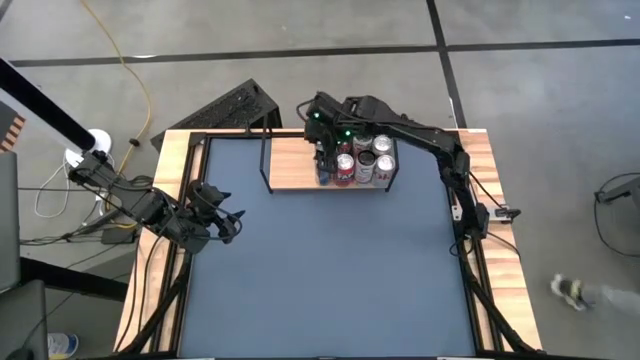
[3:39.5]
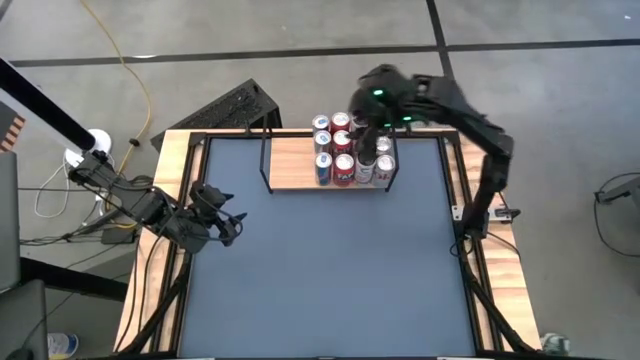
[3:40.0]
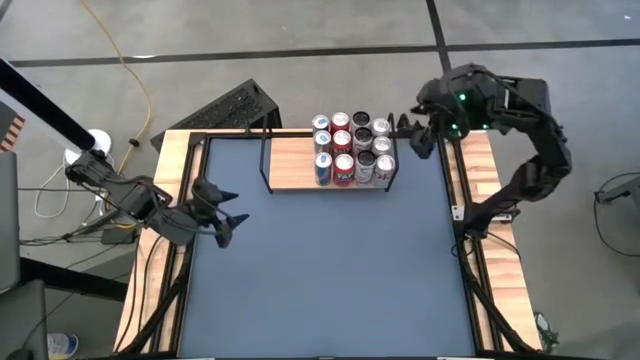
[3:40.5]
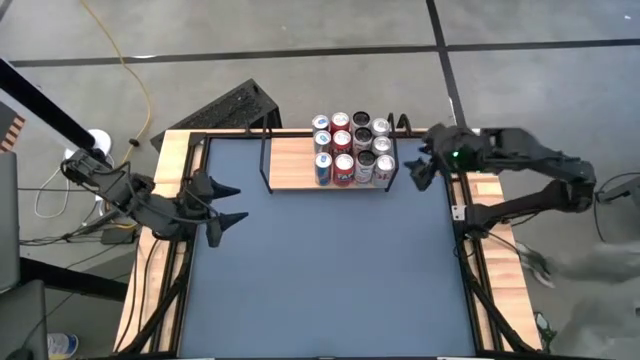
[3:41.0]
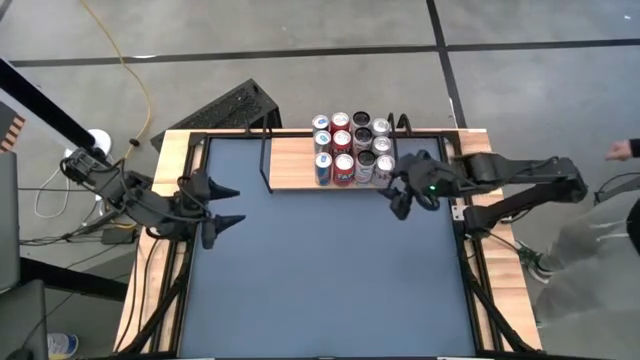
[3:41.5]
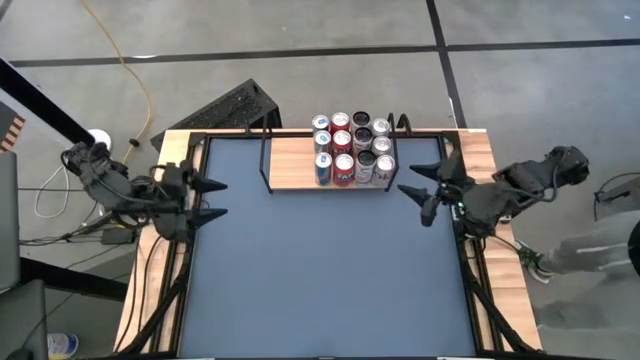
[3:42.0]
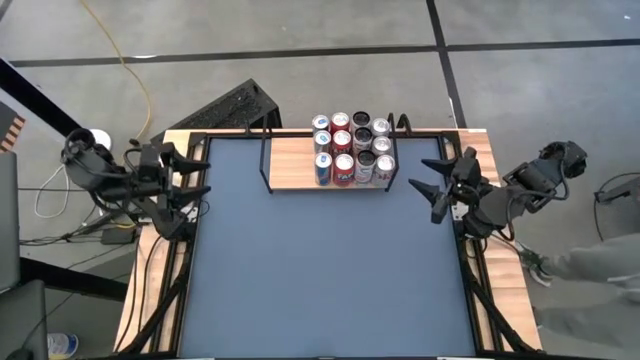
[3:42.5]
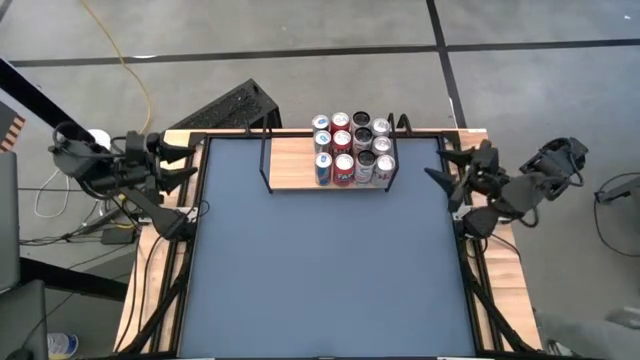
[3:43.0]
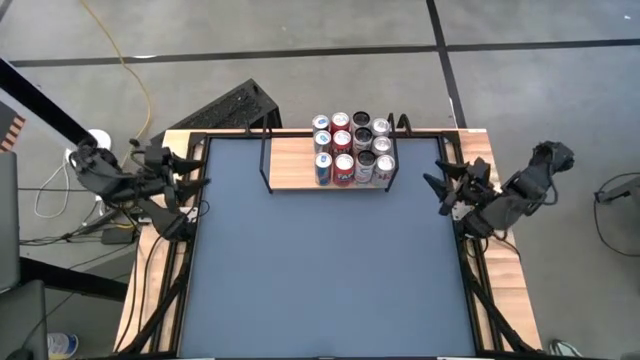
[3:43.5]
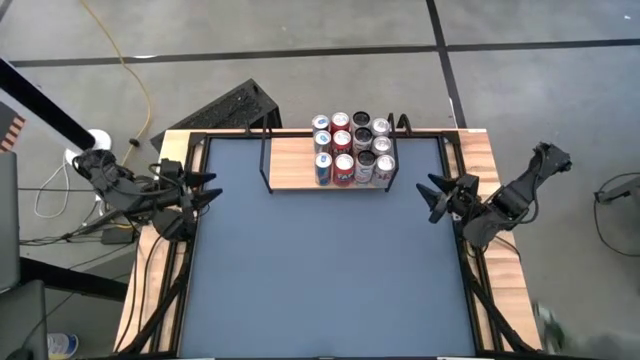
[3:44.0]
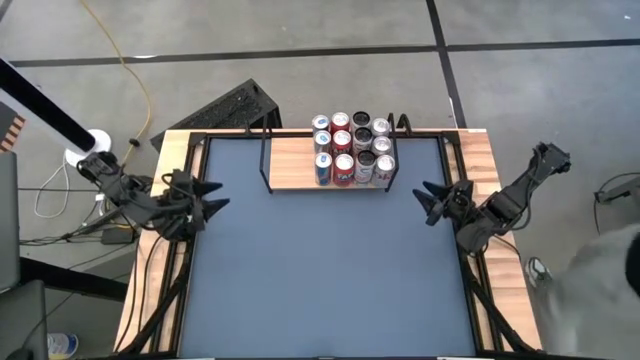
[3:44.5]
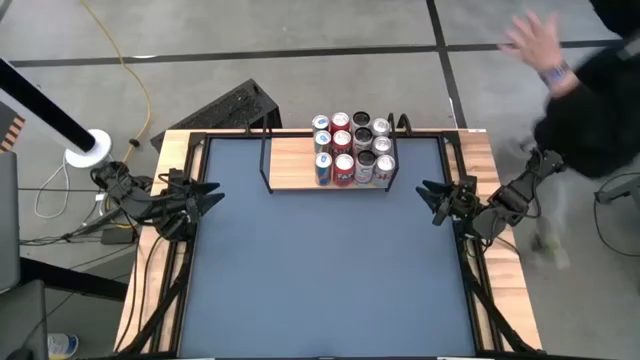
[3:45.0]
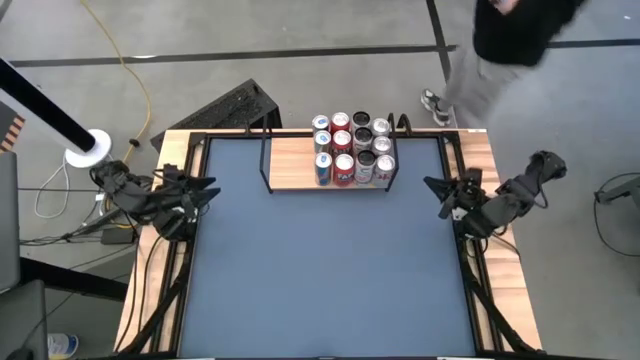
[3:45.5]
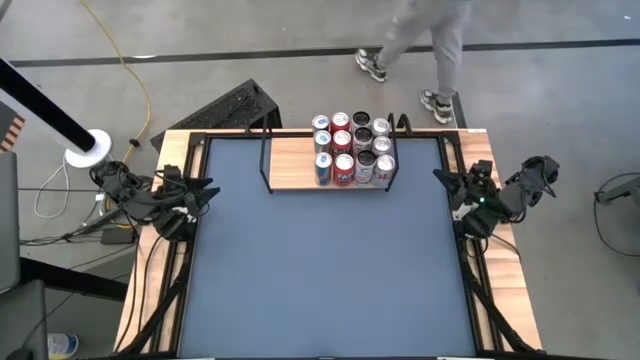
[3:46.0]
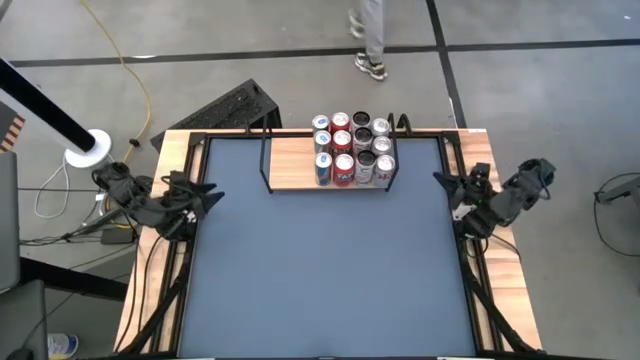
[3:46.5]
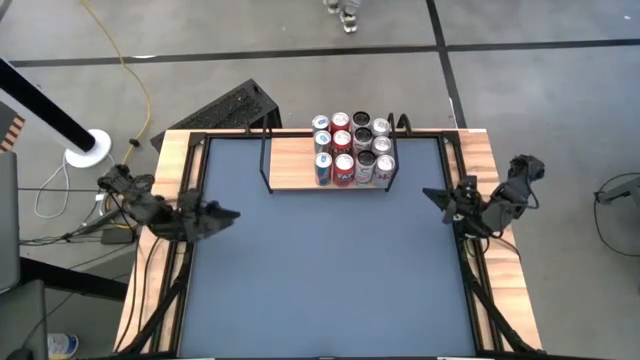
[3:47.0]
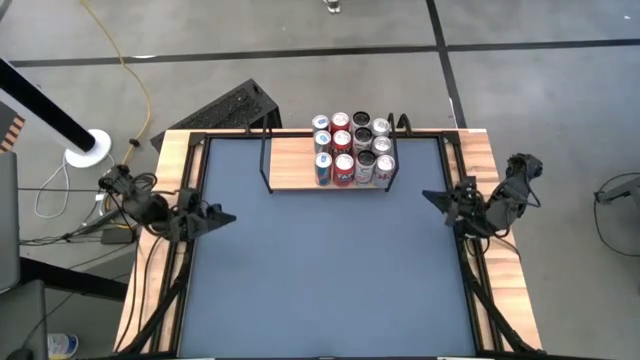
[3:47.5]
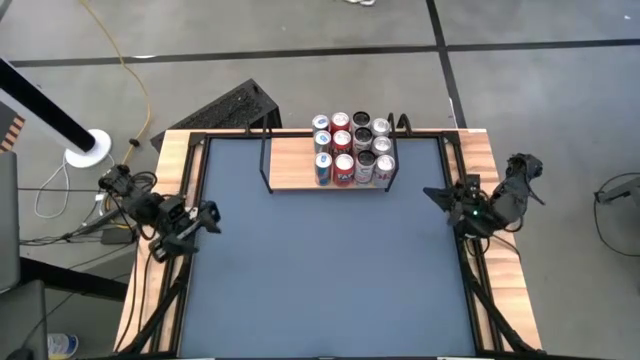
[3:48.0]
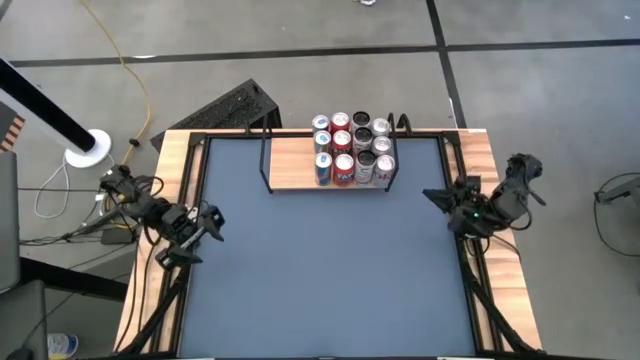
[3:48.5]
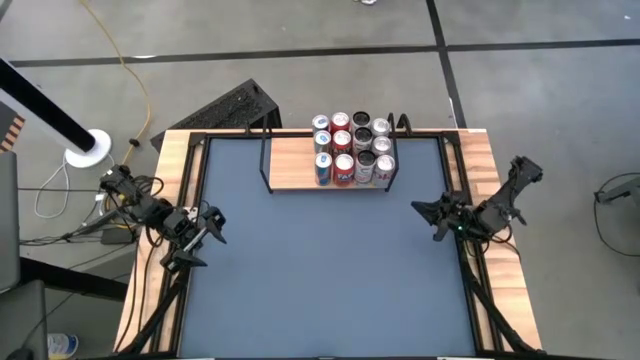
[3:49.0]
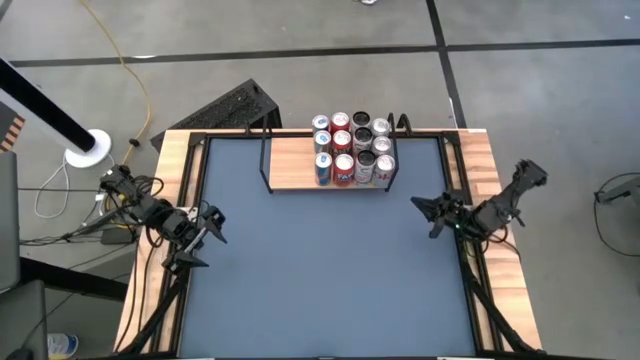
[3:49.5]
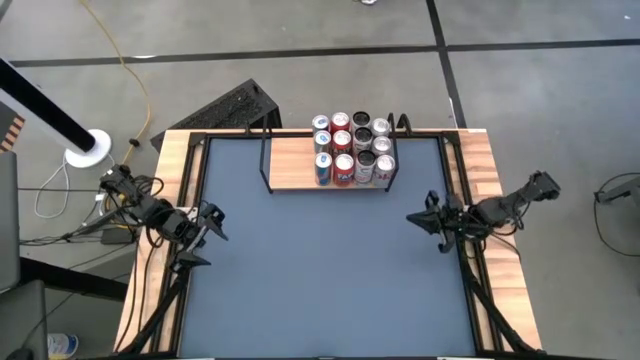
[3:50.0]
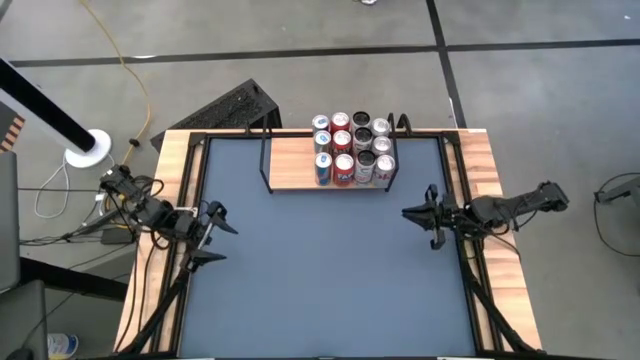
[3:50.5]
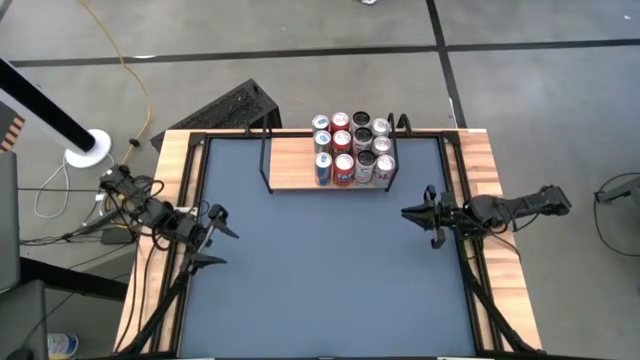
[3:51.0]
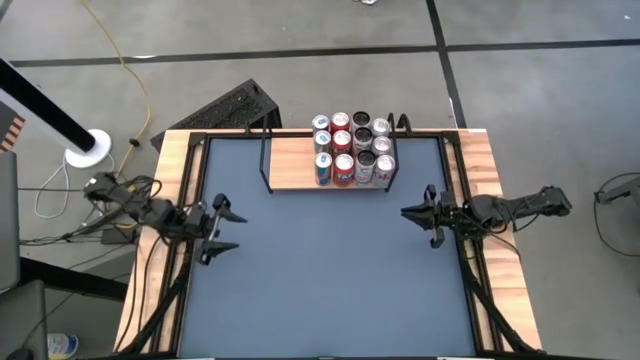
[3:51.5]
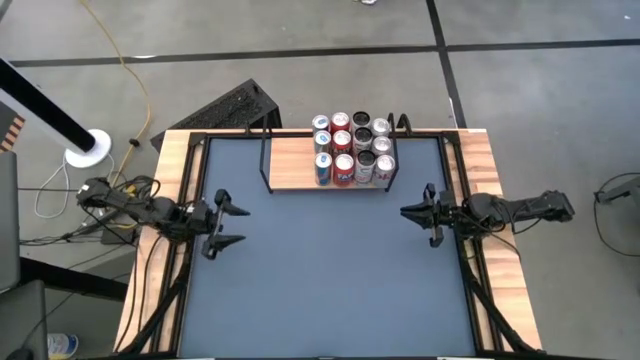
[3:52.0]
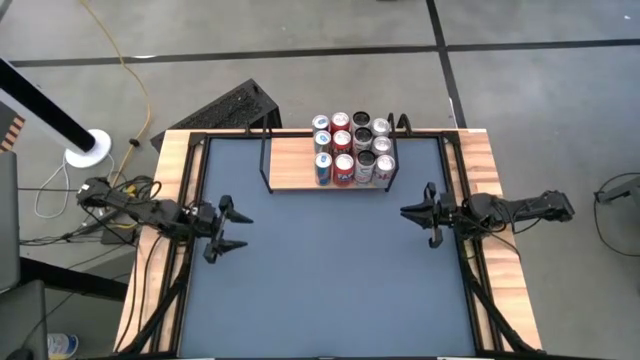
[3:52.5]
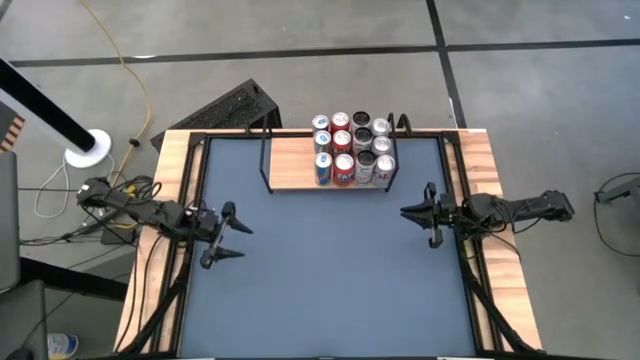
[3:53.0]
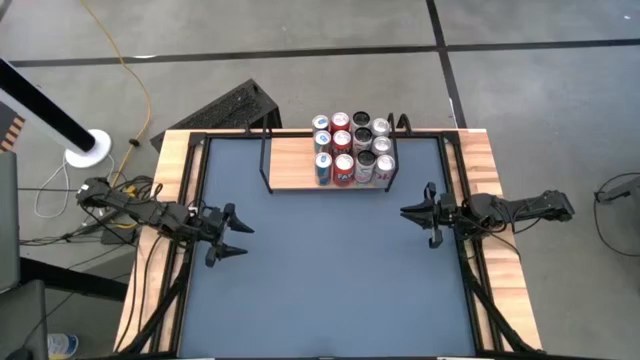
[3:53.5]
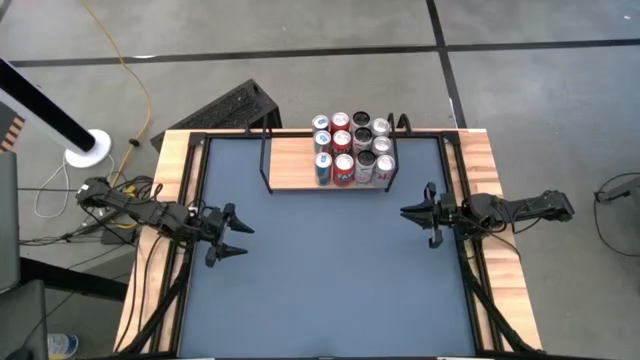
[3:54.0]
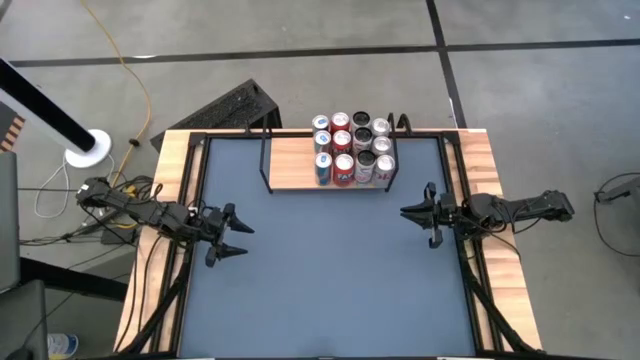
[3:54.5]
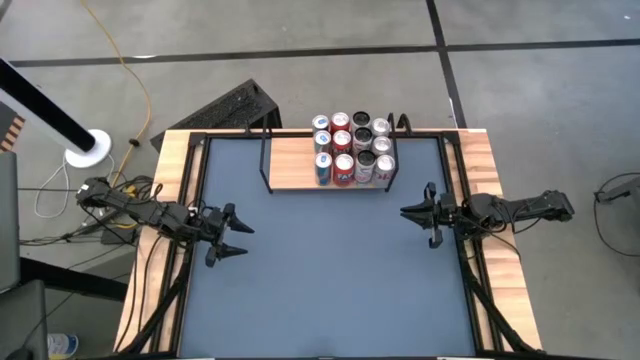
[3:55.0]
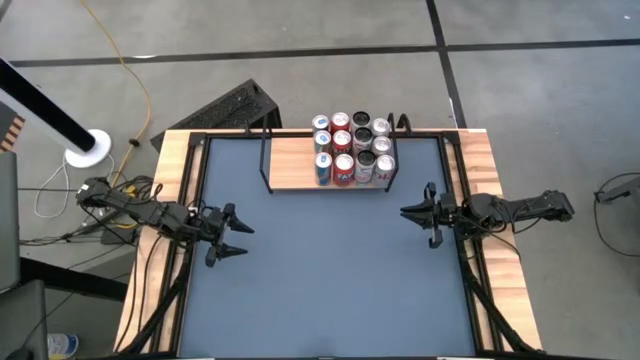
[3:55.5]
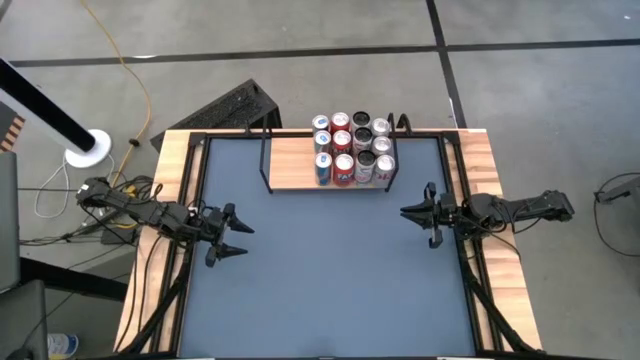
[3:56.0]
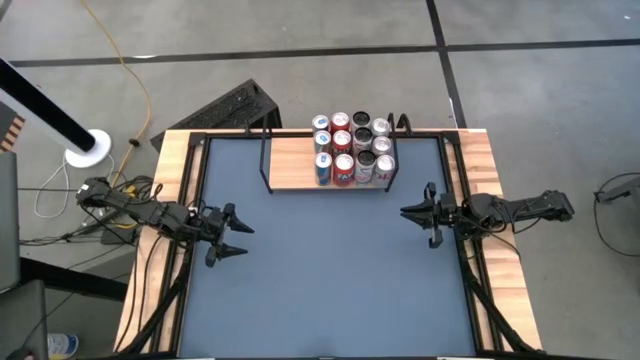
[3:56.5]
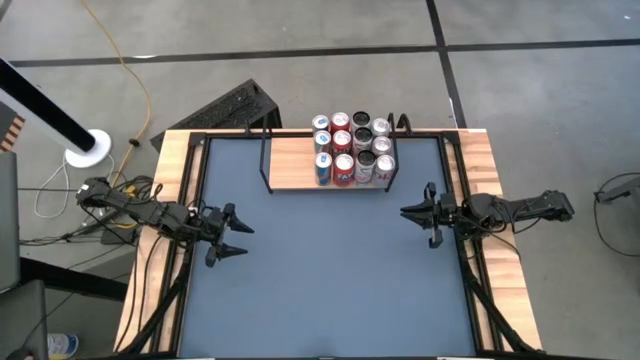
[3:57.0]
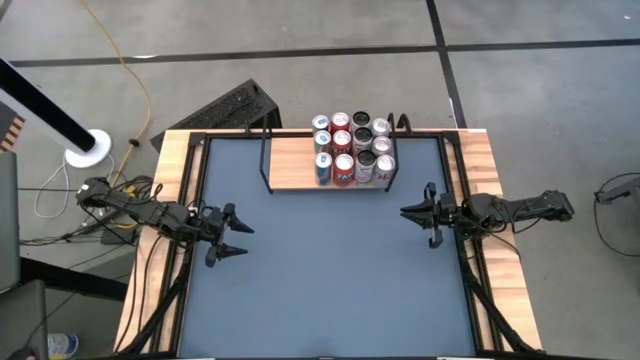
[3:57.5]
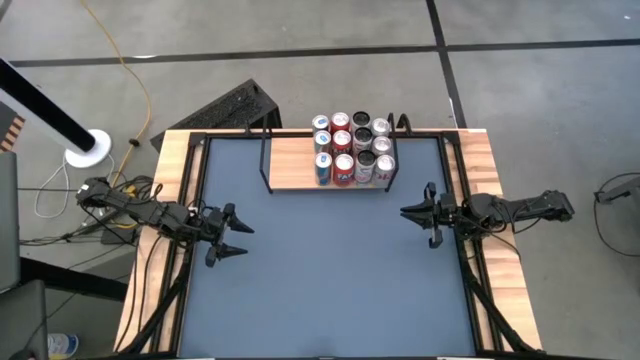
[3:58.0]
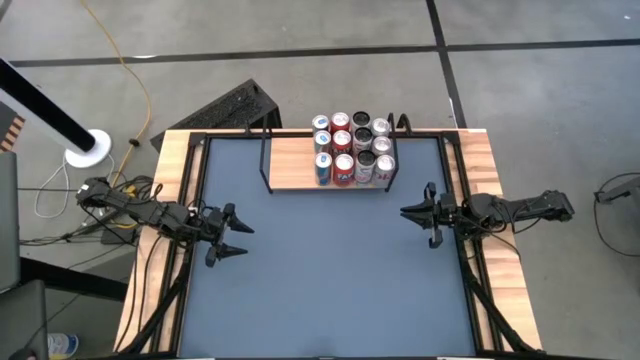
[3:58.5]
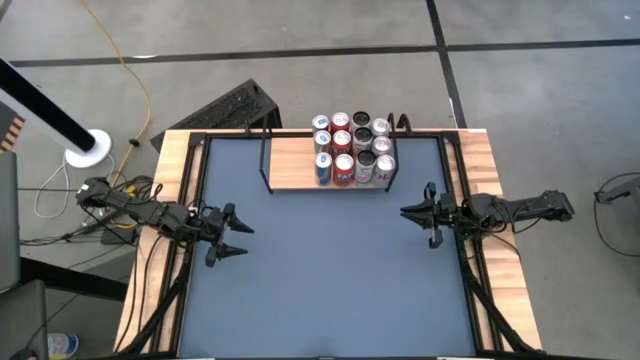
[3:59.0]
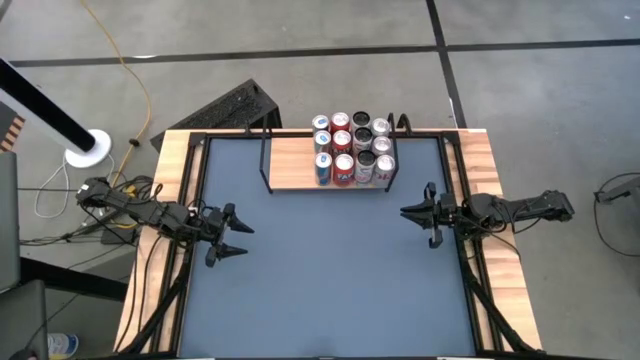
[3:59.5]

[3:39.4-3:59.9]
Task: Place canned beverage on shelf
Return to Home Position
